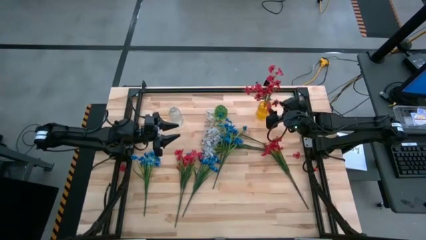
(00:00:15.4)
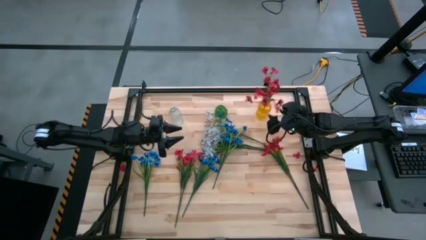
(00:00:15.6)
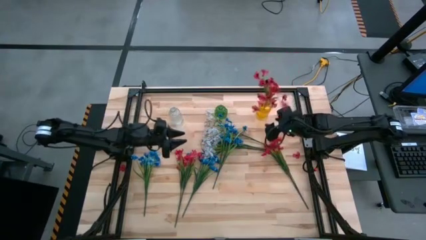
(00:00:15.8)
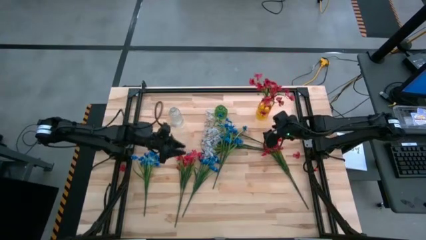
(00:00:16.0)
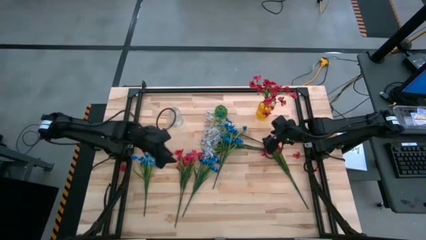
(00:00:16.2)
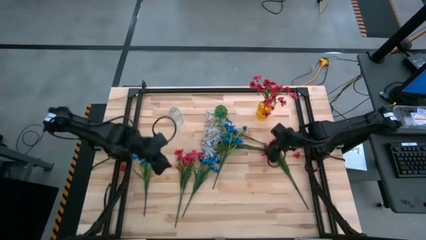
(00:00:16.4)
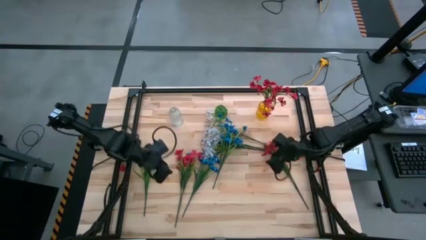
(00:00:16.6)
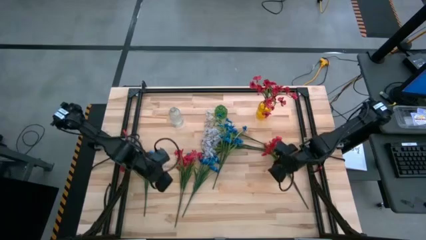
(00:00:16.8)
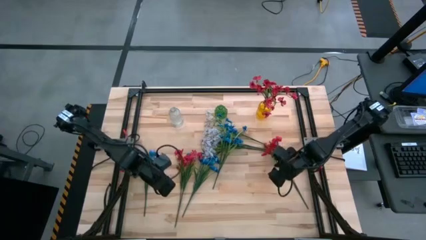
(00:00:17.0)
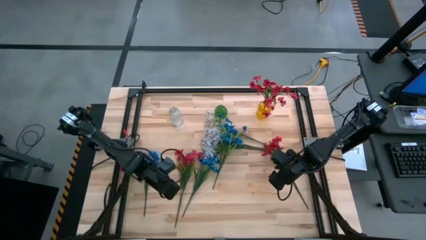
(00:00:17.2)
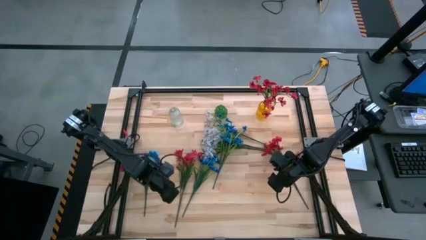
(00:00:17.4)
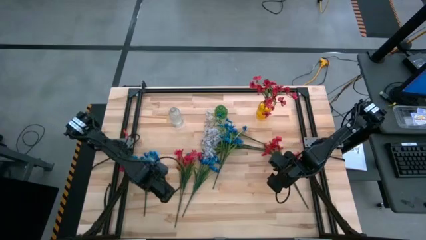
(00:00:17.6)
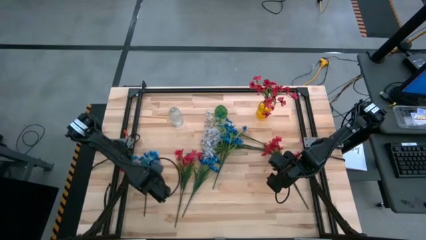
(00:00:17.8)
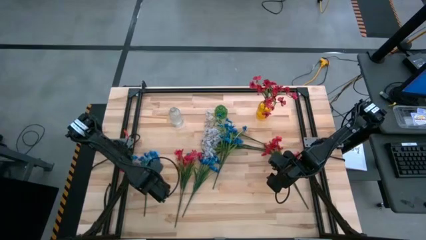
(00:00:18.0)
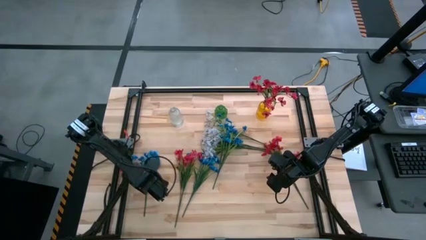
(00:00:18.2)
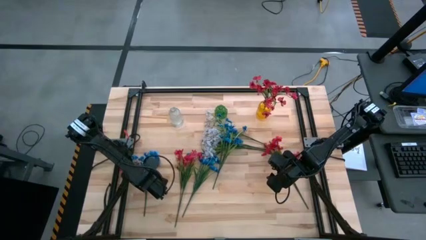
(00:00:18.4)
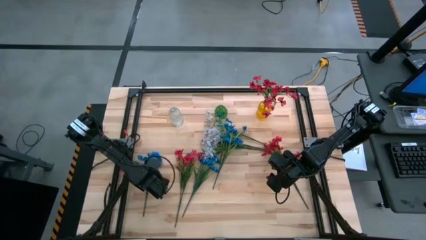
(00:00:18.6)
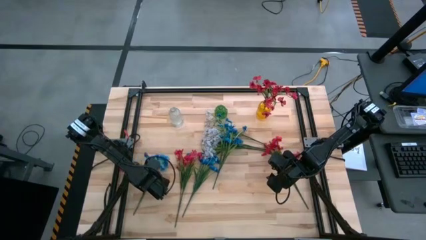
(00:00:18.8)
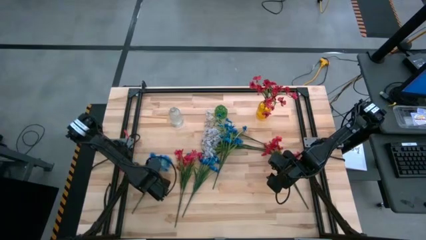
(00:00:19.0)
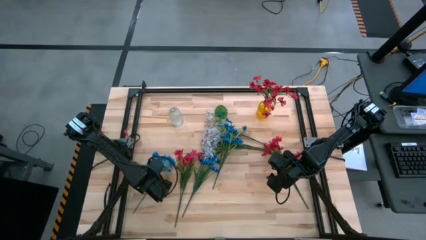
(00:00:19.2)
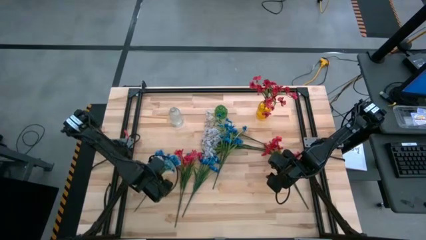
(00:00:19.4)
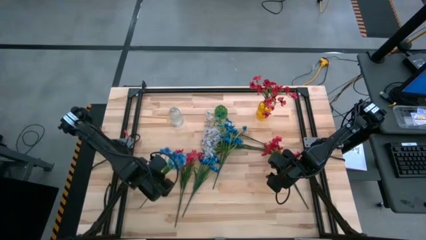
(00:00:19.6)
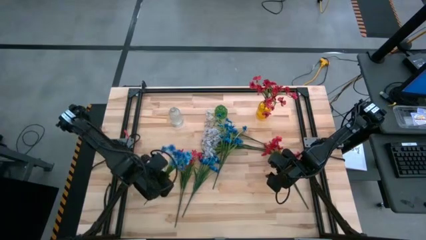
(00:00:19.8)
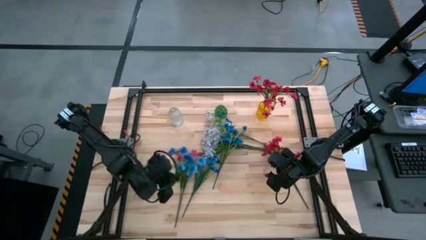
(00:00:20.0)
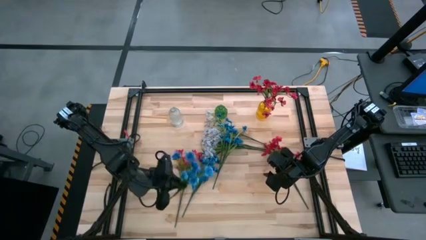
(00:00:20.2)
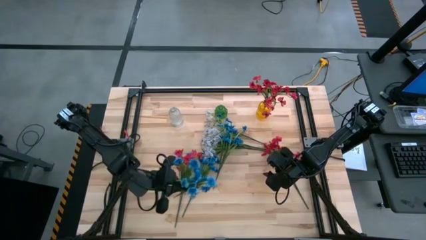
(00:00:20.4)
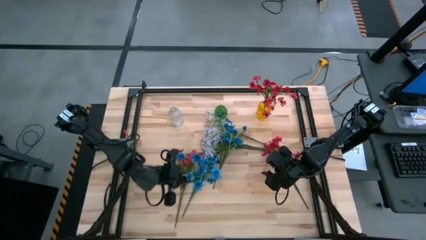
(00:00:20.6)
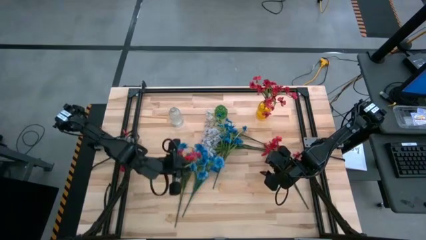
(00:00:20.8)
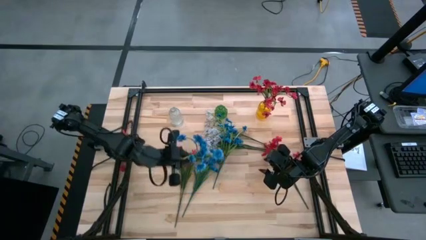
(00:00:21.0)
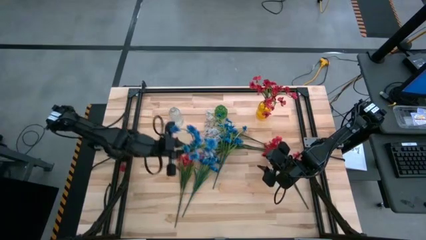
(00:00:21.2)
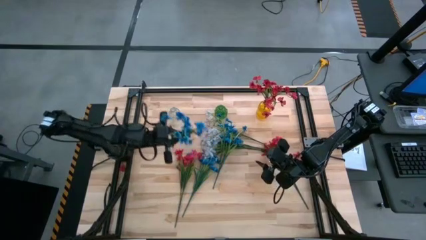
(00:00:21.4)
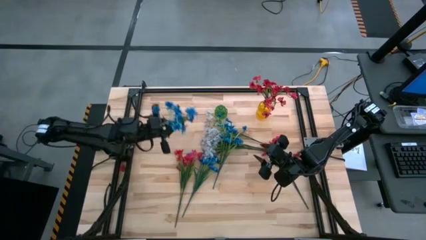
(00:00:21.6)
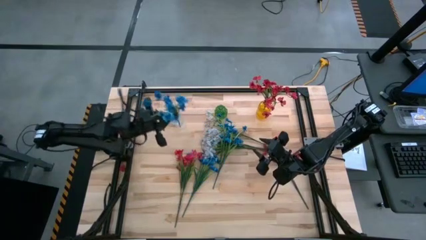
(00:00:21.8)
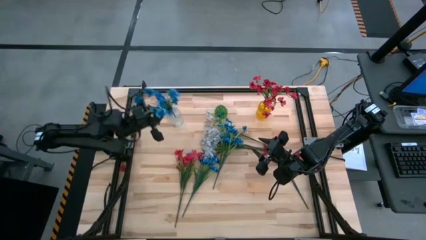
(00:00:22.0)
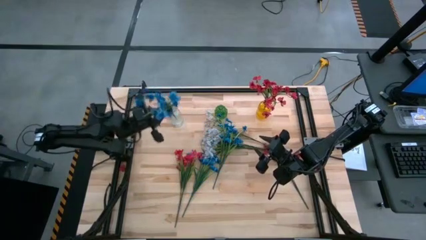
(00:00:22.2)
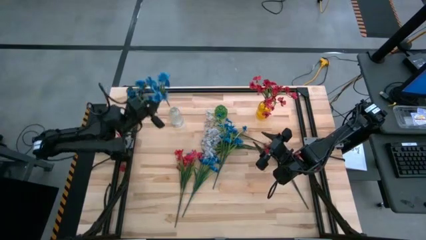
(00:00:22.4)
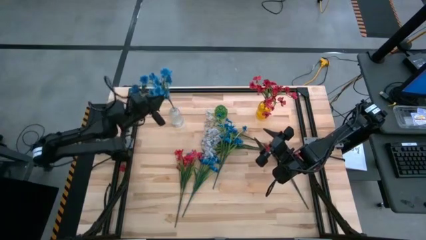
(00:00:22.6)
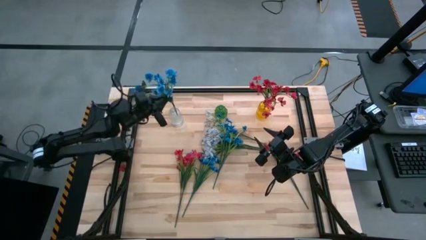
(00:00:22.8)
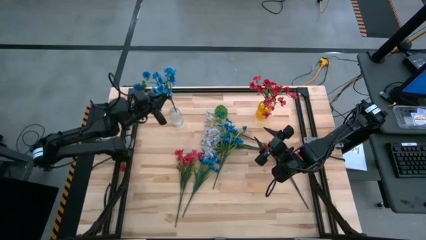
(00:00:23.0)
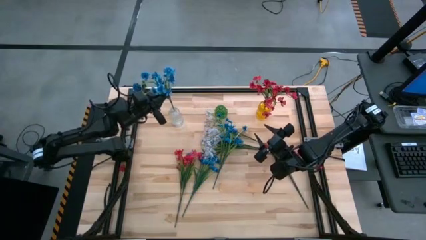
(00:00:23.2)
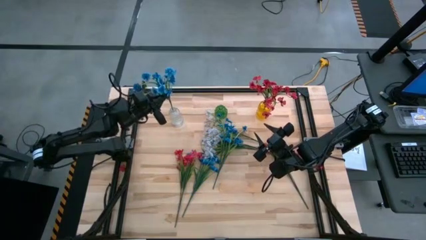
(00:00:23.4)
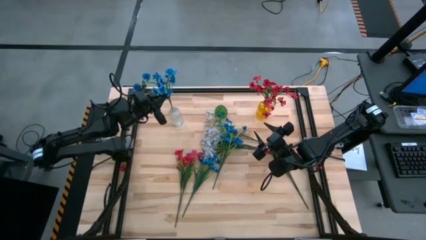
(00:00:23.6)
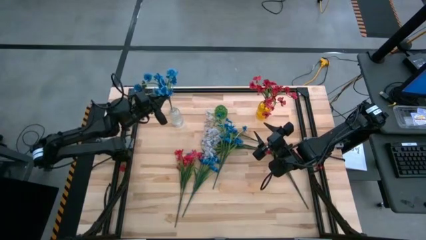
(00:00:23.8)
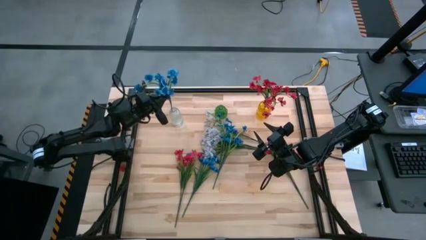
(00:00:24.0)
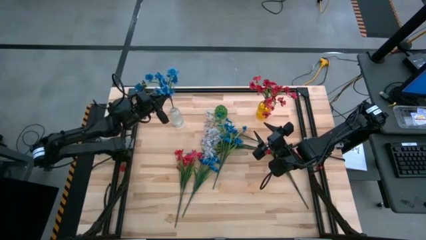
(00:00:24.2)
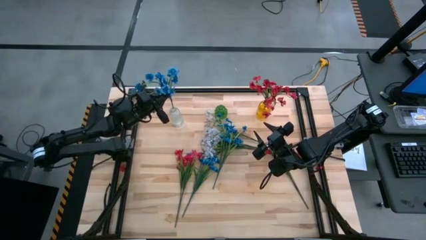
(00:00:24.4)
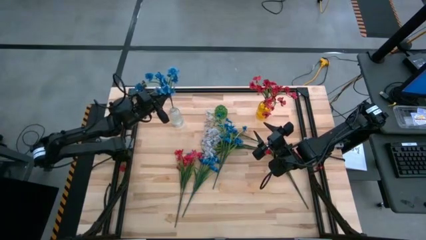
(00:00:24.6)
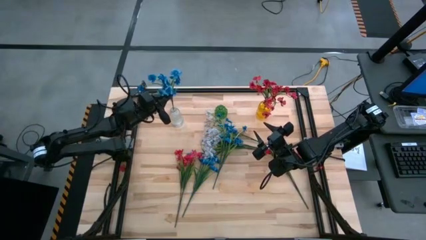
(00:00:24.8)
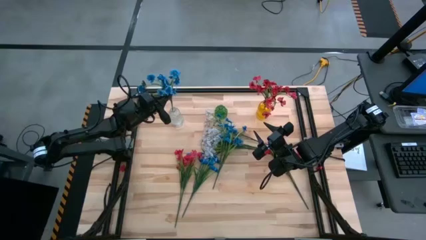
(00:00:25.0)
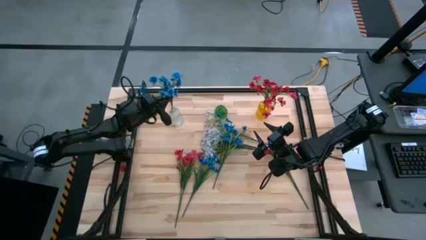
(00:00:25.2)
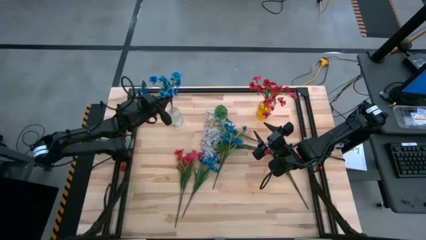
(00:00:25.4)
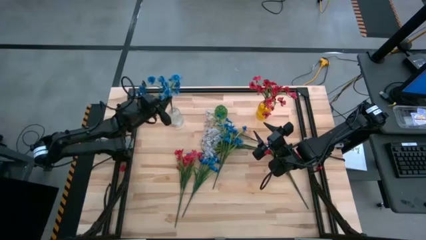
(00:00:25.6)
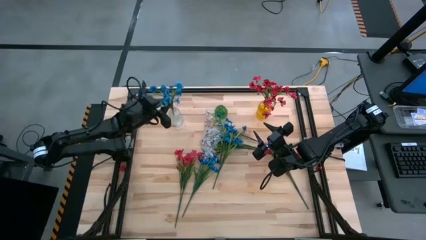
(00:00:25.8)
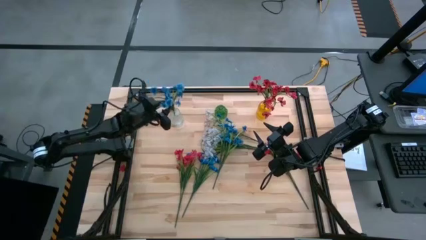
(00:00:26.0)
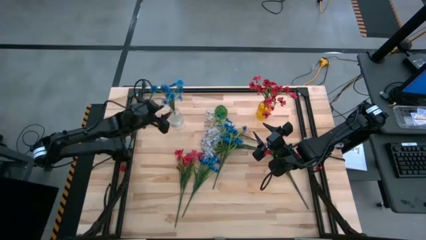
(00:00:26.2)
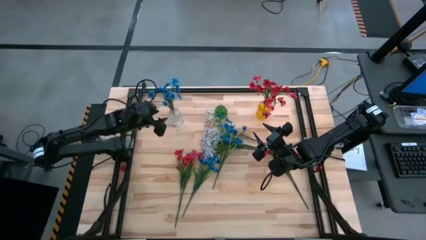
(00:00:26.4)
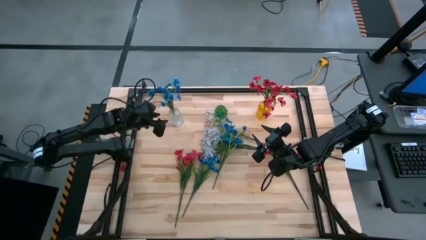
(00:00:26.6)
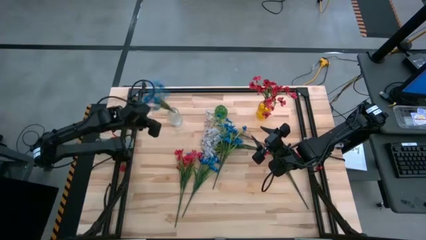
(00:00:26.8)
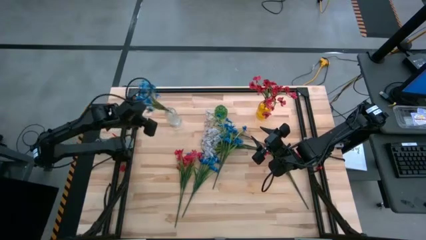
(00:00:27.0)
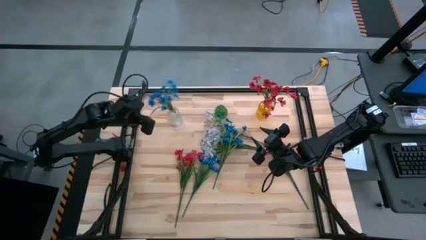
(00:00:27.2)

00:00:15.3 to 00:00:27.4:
Task: Sort flowers into vase by color
Put the blue flowers into the transparent vase
